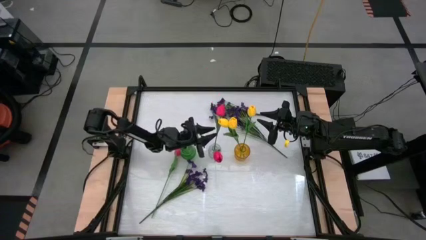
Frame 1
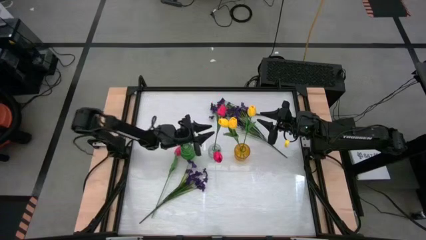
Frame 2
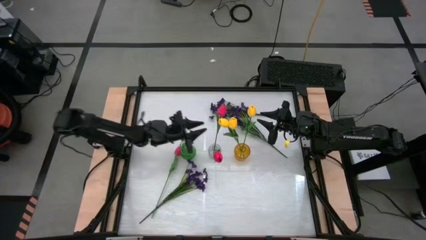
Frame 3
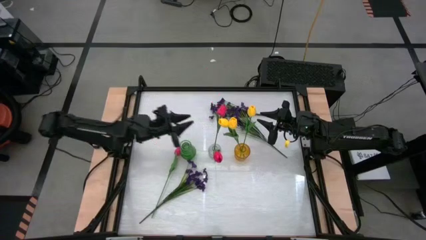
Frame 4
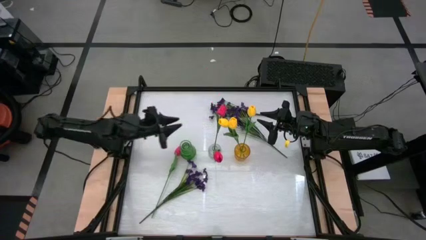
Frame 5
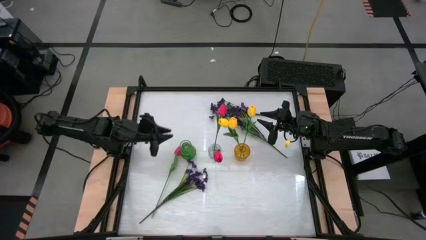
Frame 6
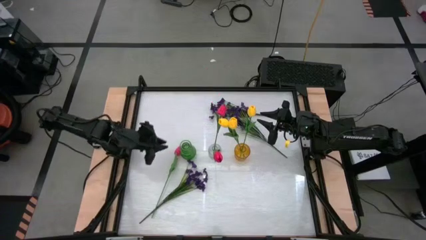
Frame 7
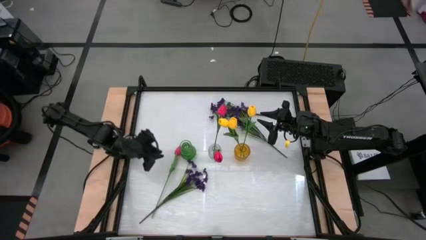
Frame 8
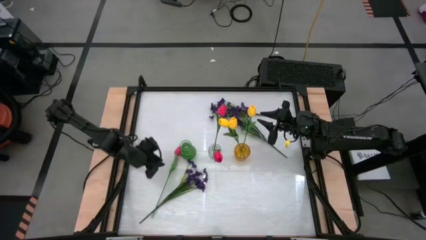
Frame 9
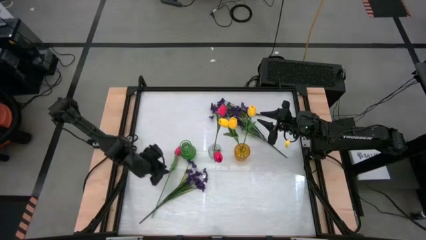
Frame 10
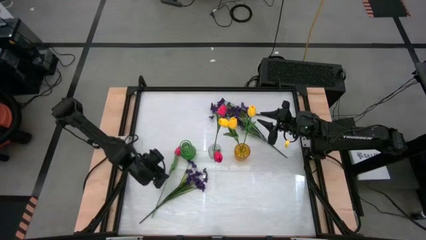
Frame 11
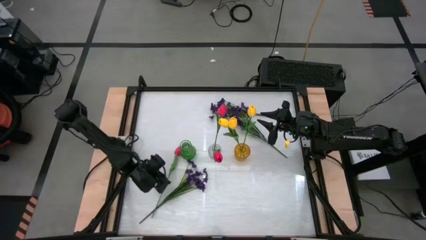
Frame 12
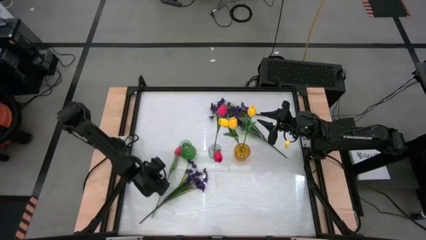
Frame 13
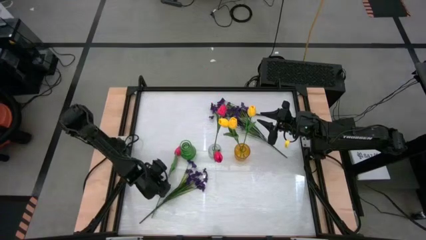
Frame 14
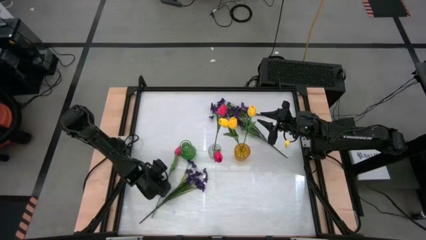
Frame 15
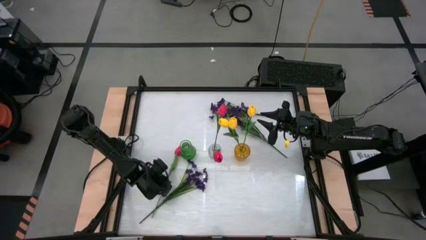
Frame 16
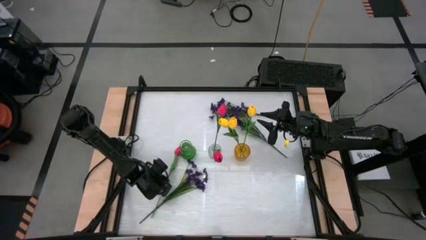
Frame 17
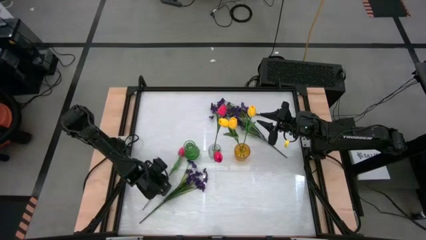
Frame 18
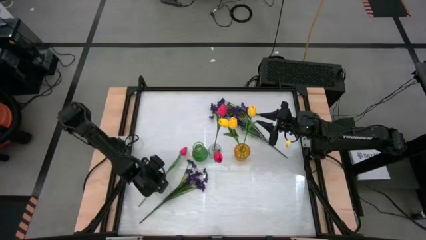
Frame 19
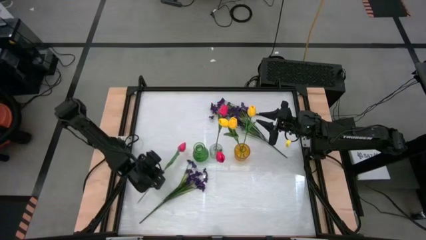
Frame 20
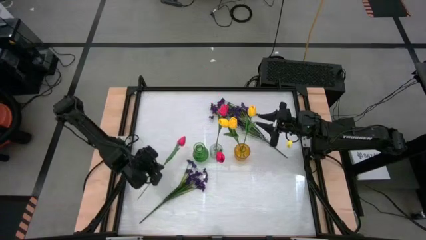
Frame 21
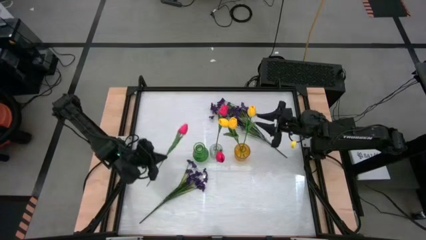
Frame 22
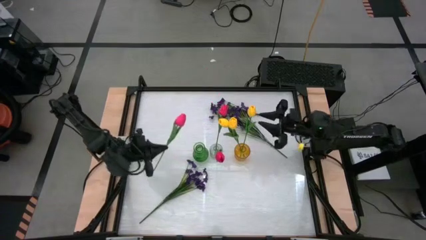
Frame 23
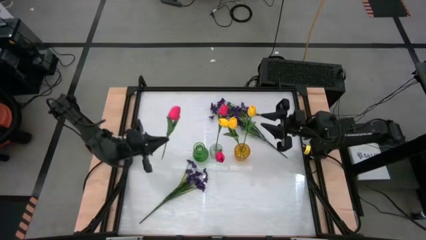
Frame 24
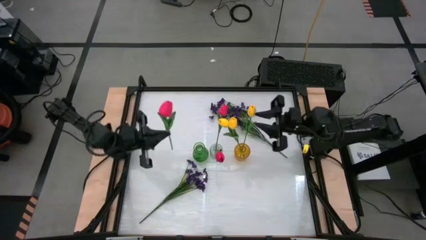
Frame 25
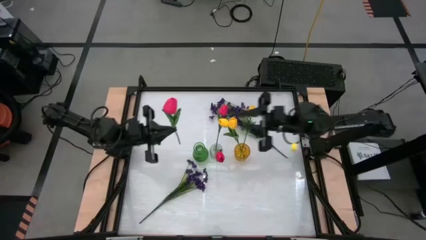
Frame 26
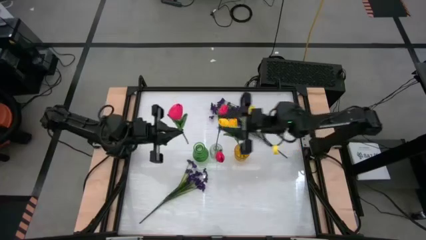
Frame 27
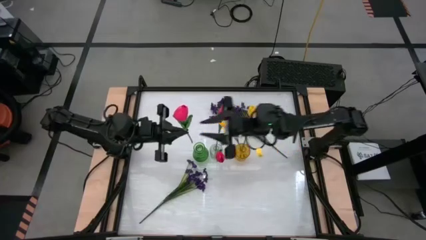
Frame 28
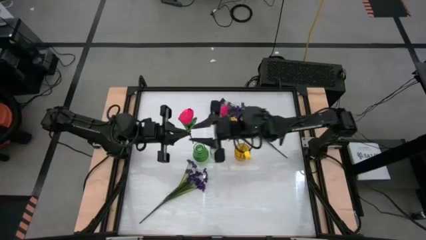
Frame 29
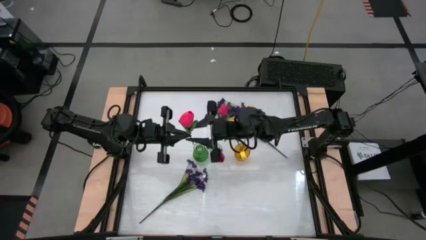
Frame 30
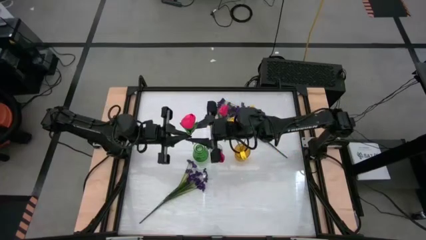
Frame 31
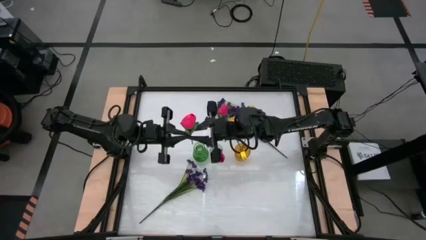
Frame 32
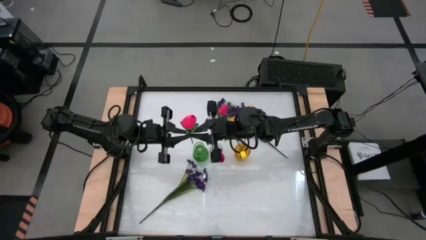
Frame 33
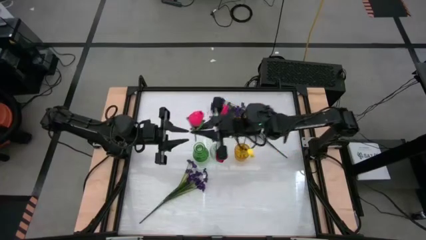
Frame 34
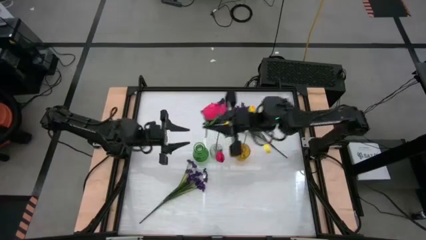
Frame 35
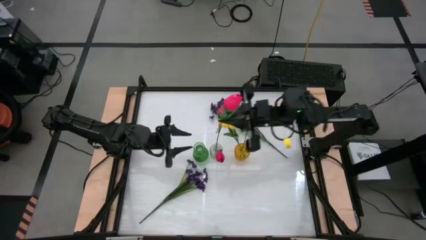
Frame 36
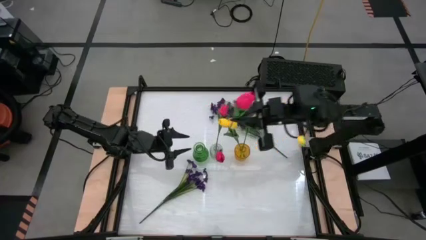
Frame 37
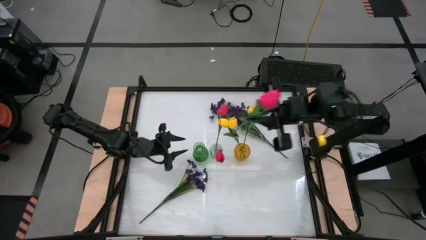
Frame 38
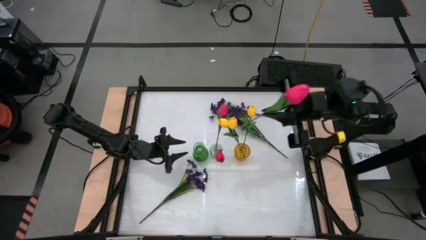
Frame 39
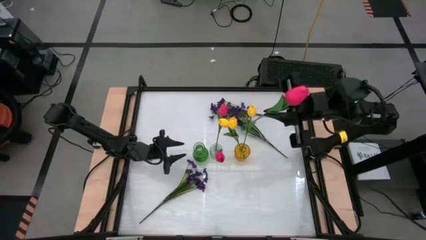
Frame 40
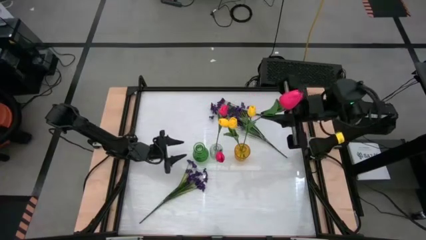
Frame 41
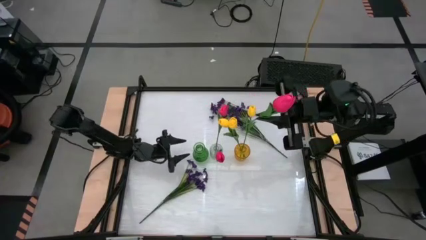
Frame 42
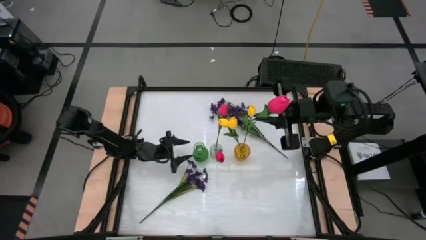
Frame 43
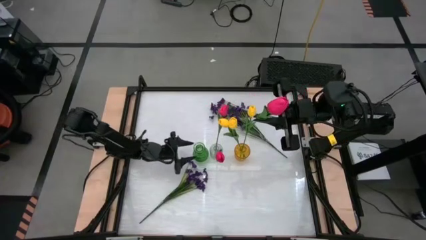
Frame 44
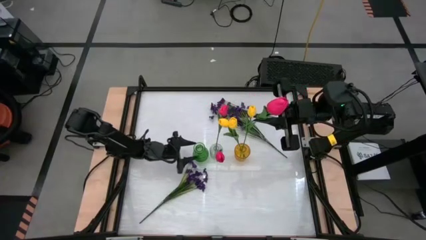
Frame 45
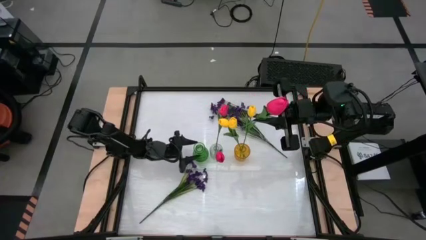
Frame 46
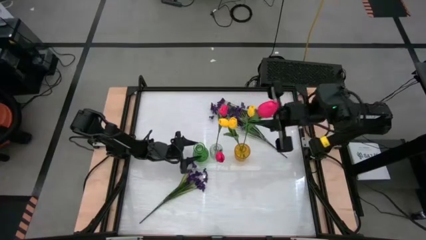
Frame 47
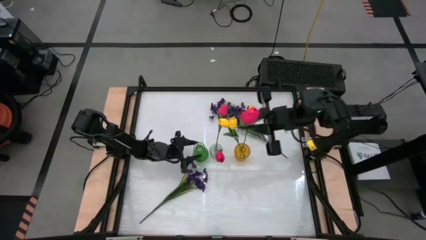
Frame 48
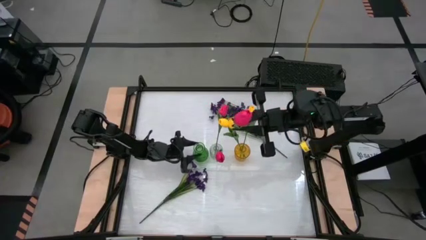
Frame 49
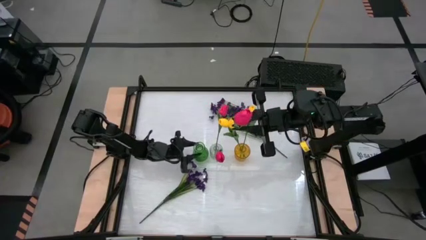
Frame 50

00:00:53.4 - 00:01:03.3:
Task: Sort flowers into vase by color
Put the red tulip into the transparent vase

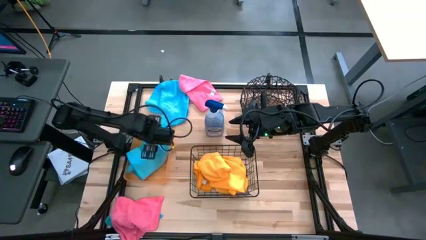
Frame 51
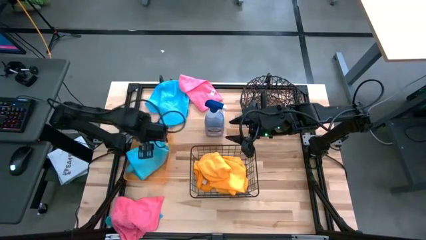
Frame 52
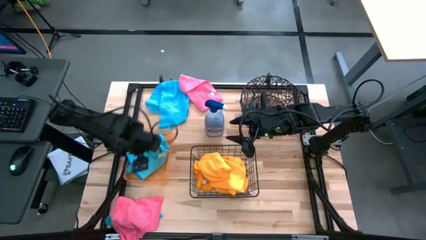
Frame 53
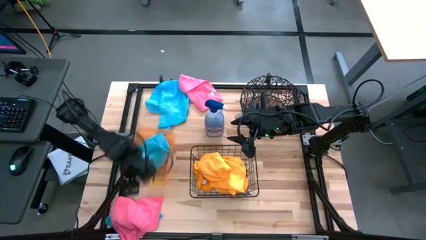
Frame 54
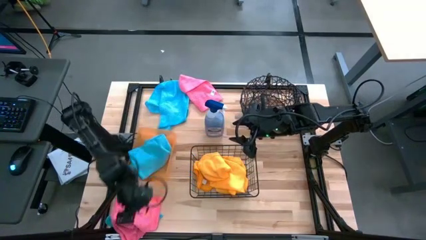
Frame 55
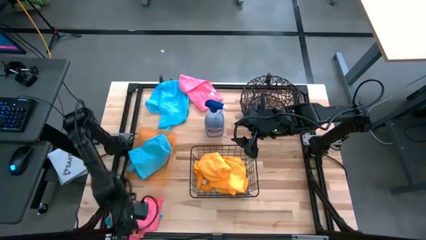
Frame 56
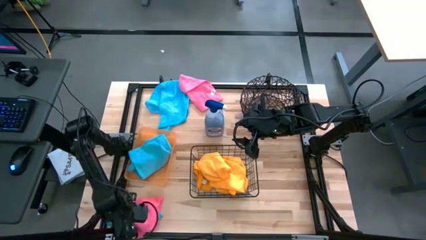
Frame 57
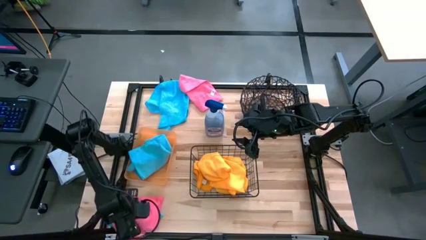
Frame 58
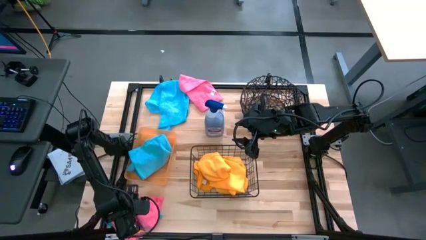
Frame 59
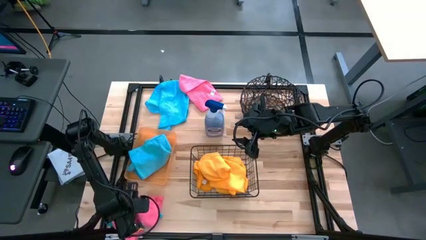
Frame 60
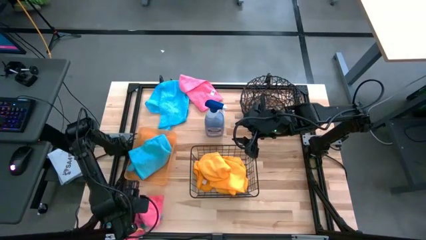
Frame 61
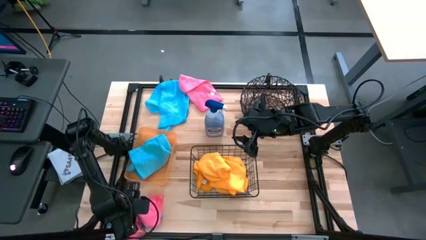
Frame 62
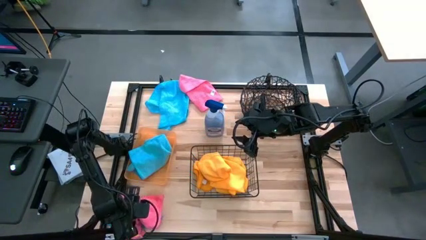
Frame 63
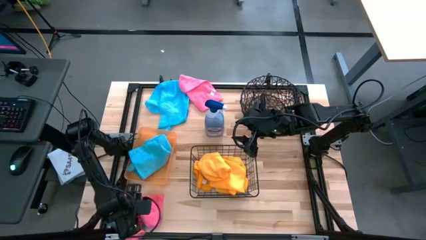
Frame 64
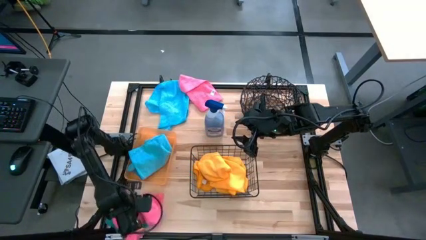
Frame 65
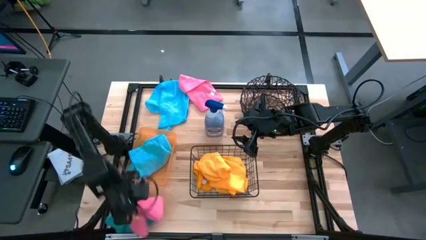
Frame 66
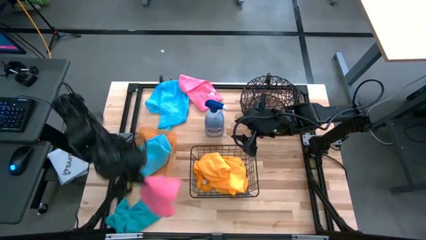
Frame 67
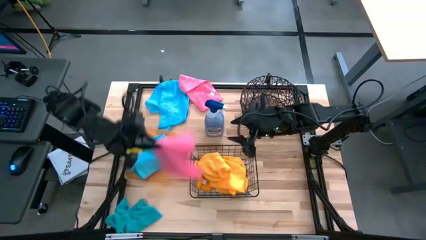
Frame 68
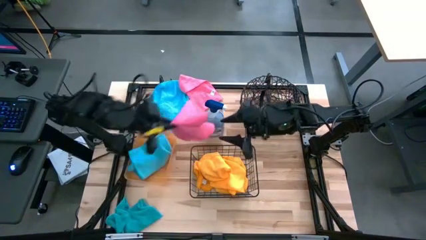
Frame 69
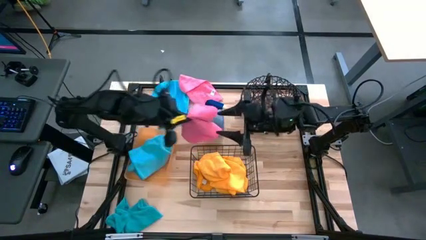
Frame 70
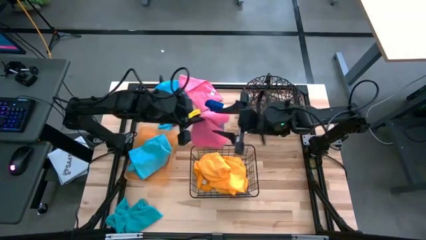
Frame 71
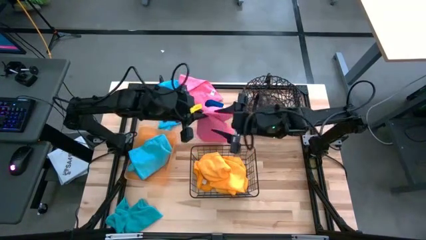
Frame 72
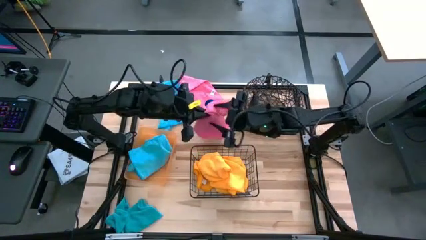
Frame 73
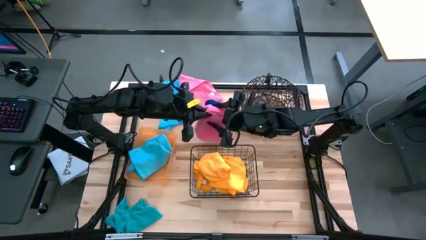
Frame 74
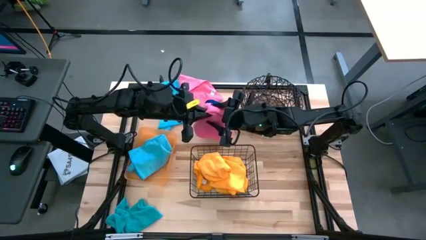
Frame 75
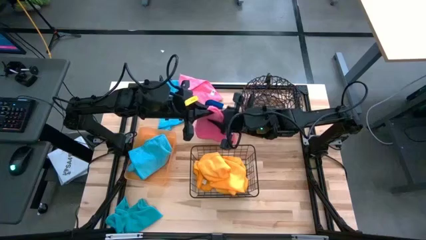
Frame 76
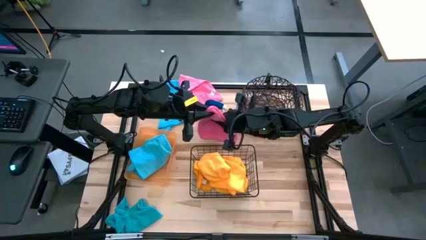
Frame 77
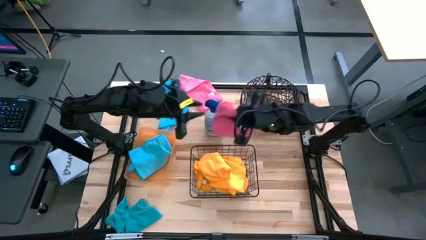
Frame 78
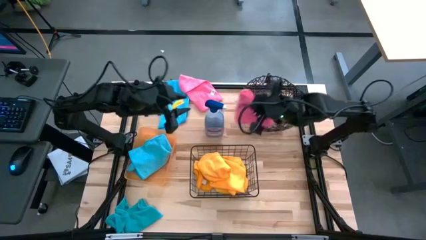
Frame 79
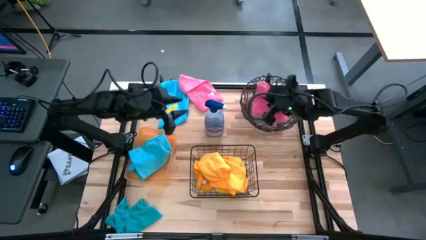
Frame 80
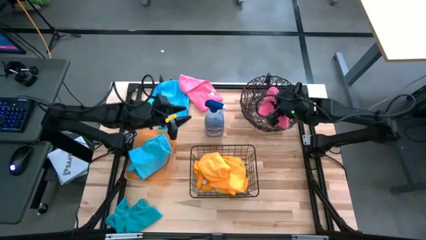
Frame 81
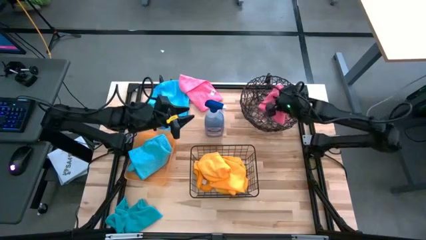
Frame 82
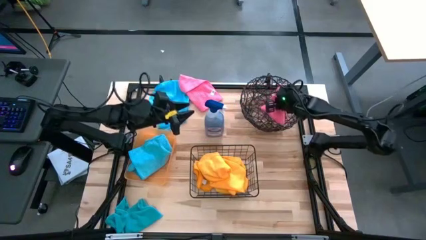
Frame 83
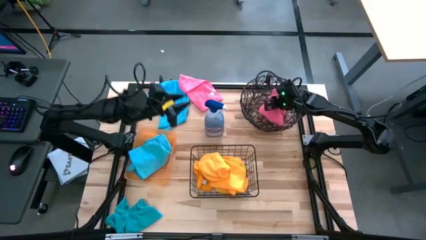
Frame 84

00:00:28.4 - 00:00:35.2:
Task: Sort microfiber towel by color & place in baskets
Put the bottom pink microfiber towel into the top basket
